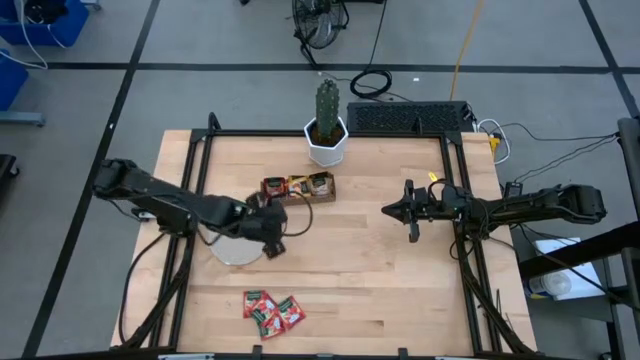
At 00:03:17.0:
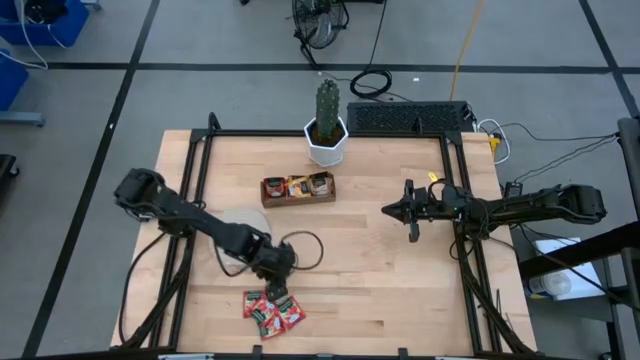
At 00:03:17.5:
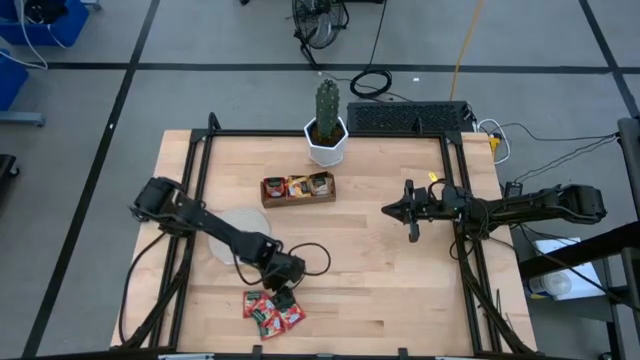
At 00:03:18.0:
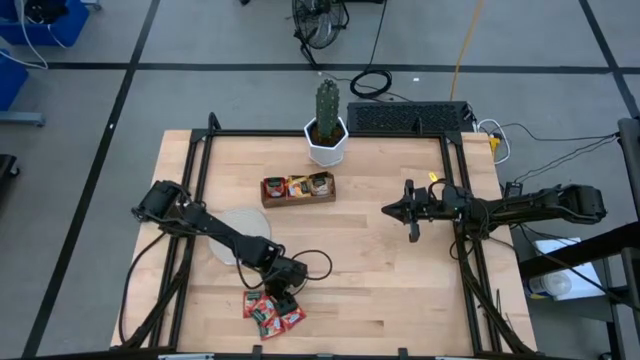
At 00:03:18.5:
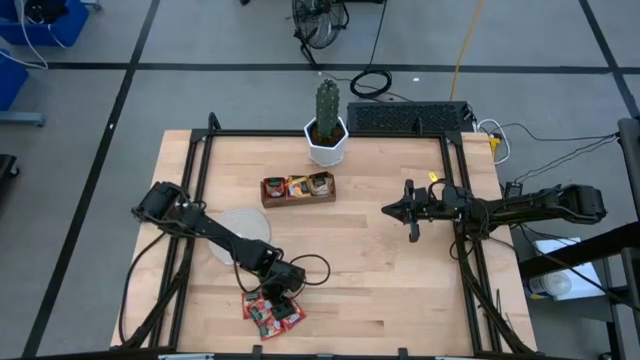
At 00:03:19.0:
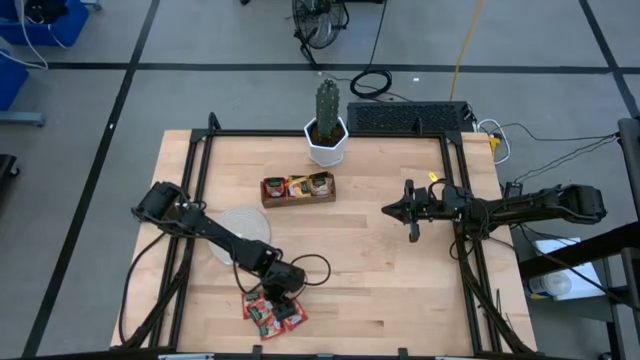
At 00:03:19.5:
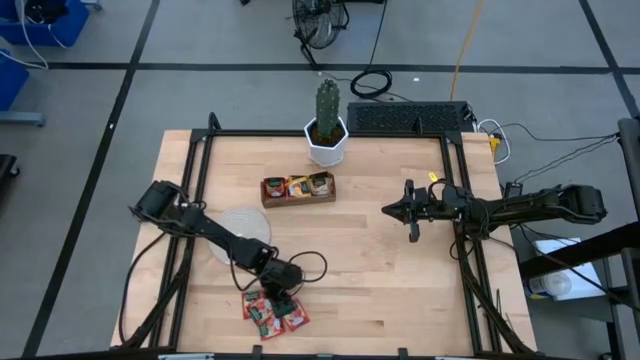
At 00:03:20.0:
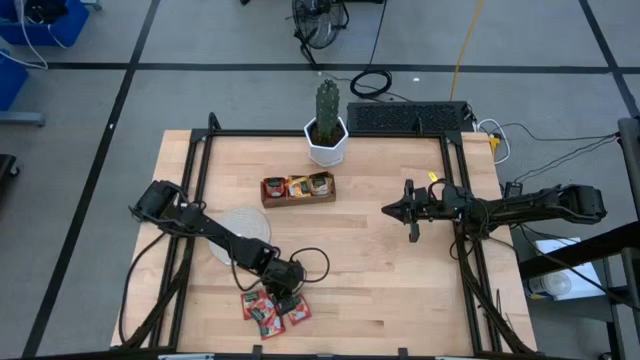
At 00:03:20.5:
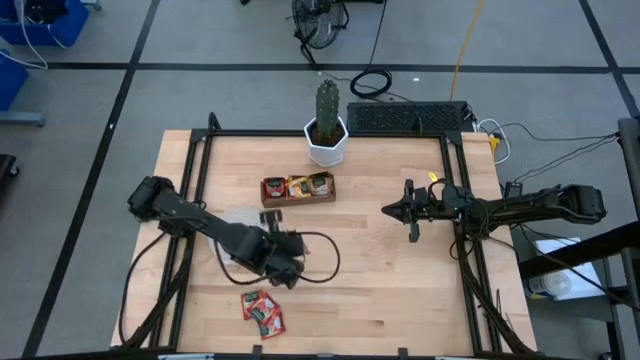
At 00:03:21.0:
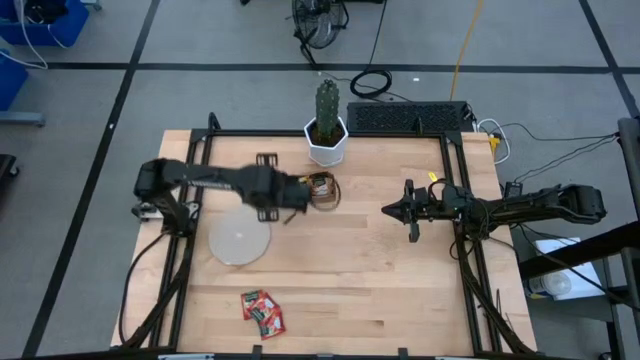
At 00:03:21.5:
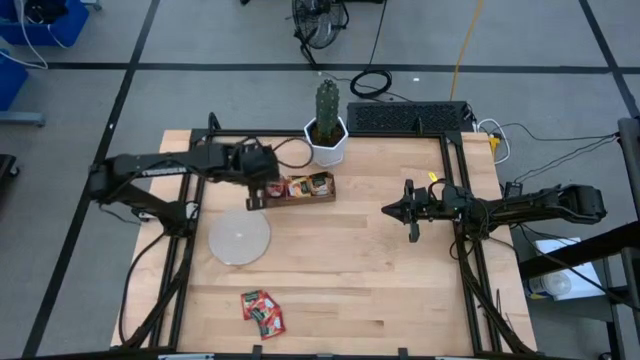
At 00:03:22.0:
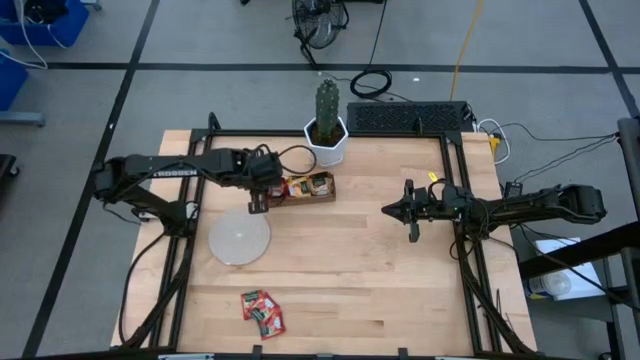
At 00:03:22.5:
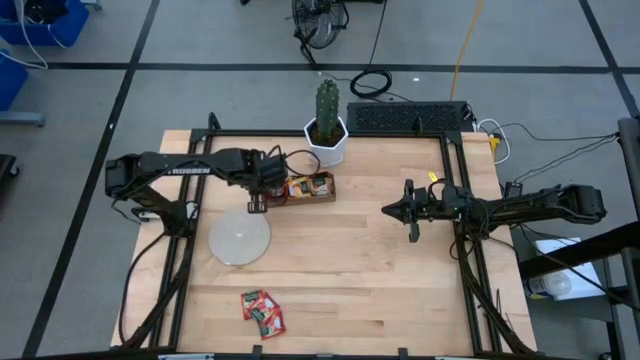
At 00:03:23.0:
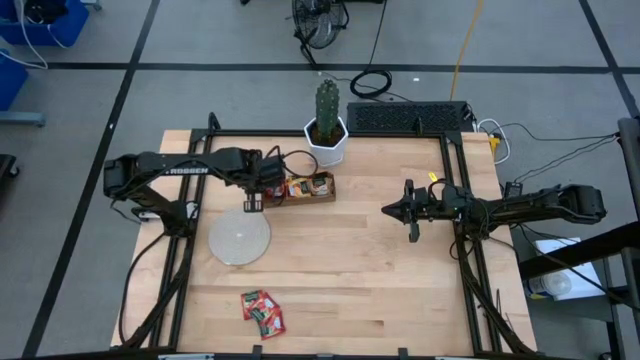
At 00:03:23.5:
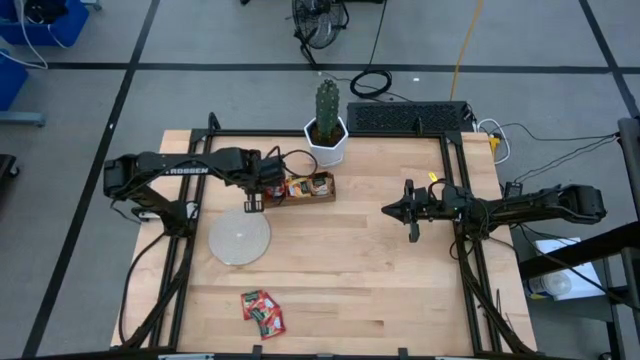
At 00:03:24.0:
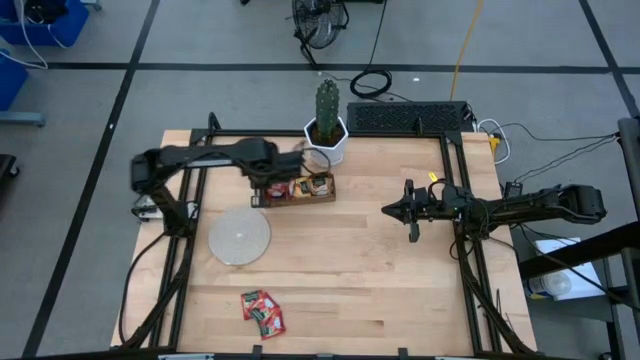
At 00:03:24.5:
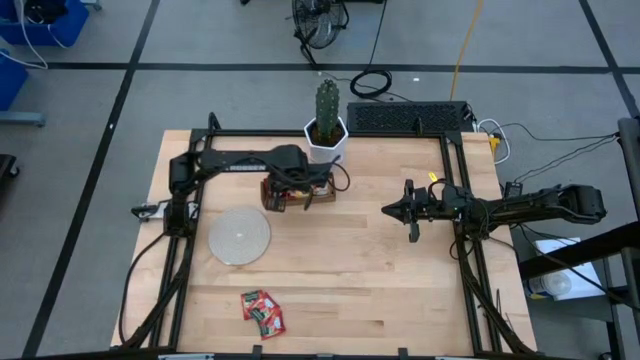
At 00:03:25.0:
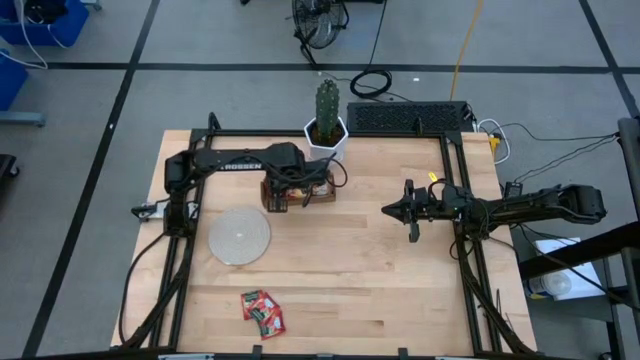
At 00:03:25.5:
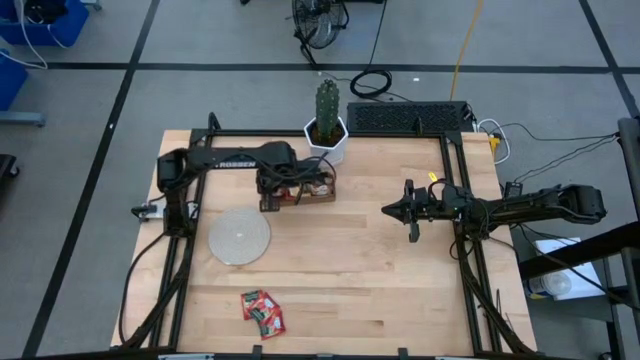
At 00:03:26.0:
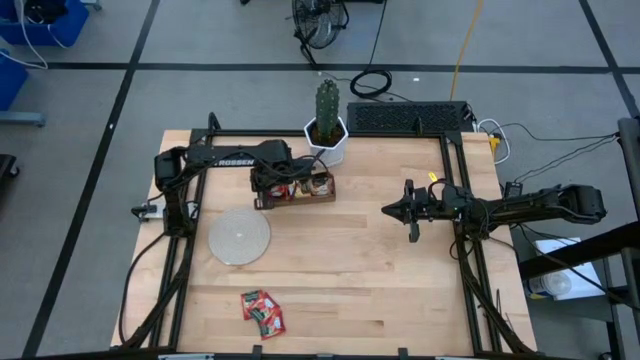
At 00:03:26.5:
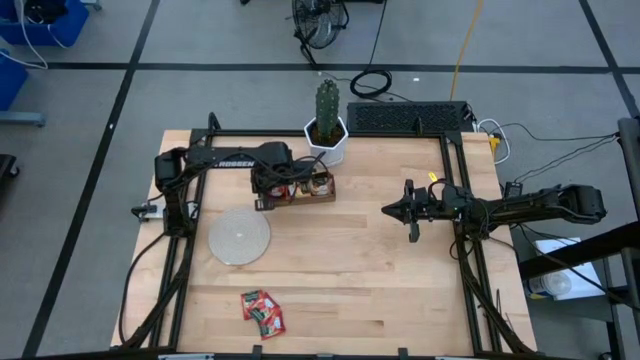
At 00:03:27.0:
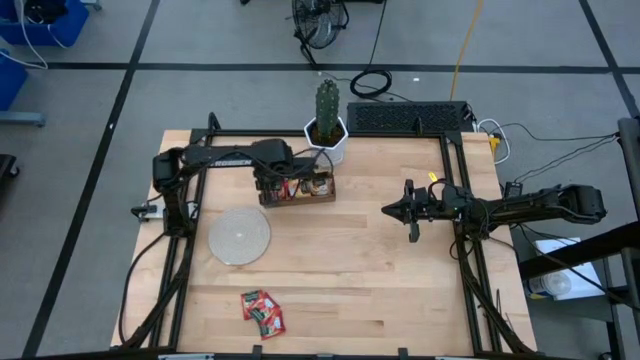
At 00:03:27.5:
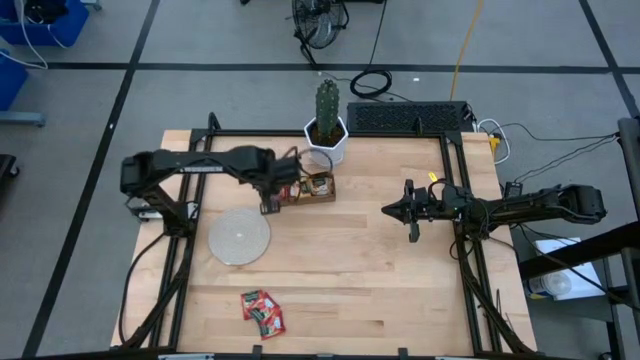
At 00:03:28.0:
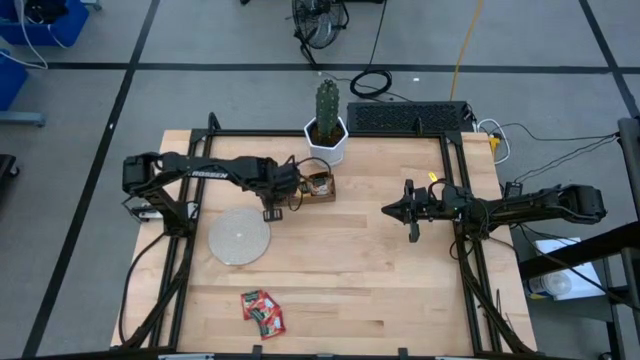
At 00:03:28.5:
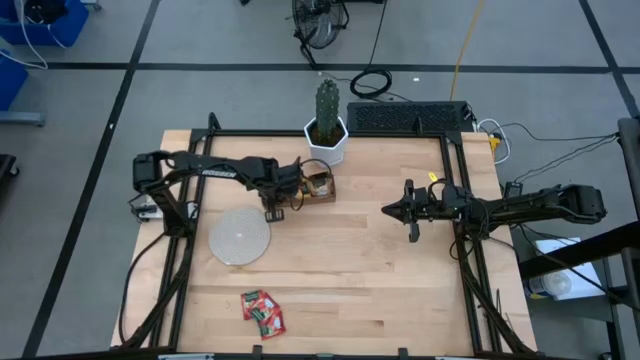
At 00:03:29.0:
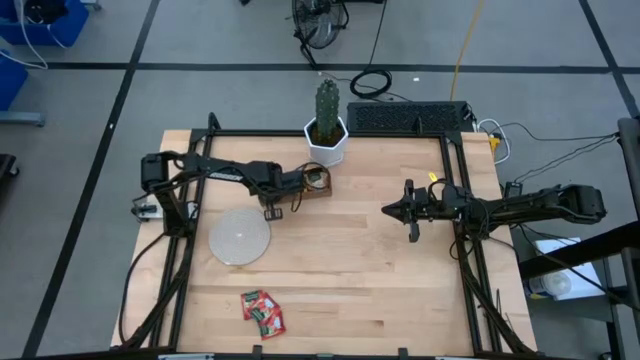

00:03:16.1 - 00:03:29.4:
Task: Pick & Place Tea
Put the red tea bag into the left section of the wooden organizer

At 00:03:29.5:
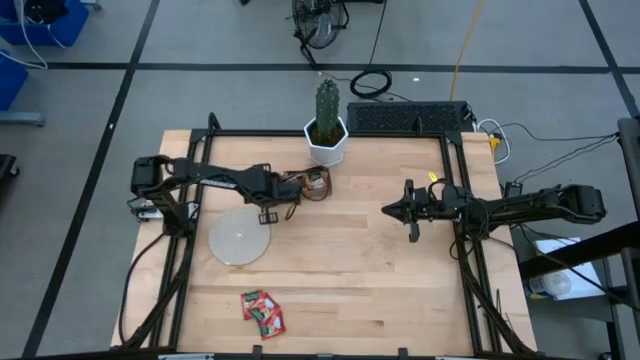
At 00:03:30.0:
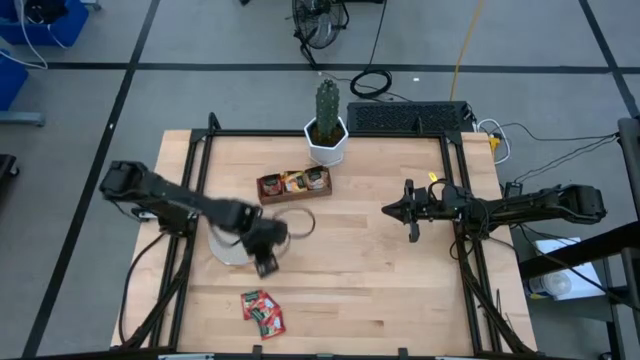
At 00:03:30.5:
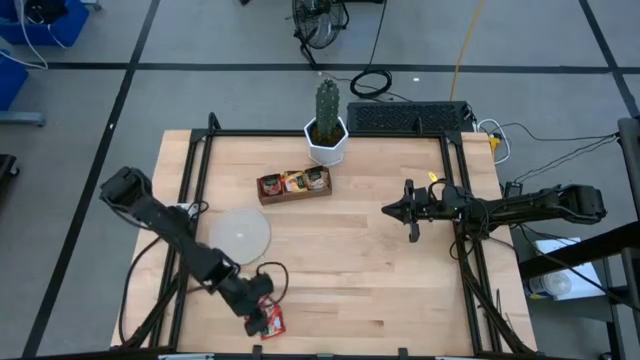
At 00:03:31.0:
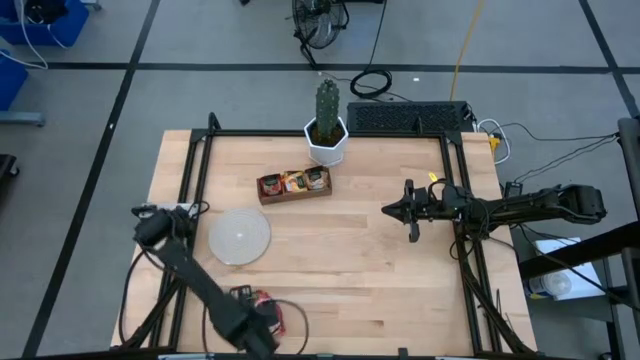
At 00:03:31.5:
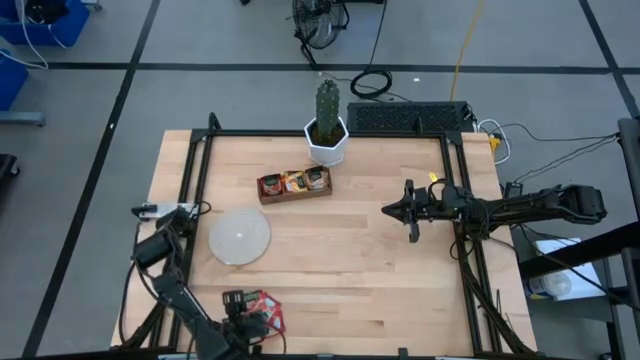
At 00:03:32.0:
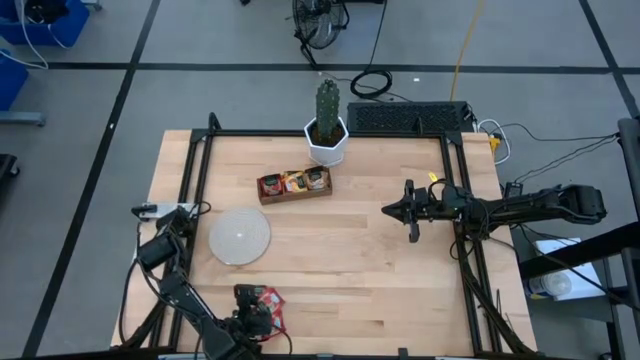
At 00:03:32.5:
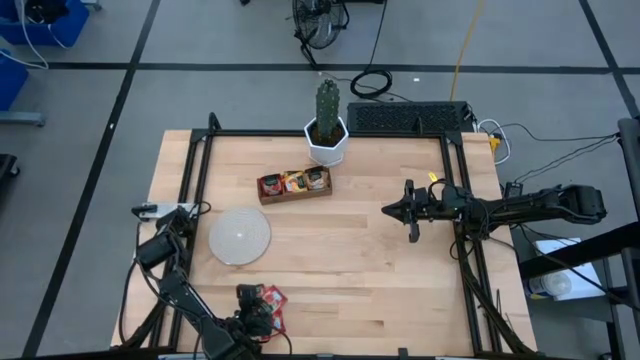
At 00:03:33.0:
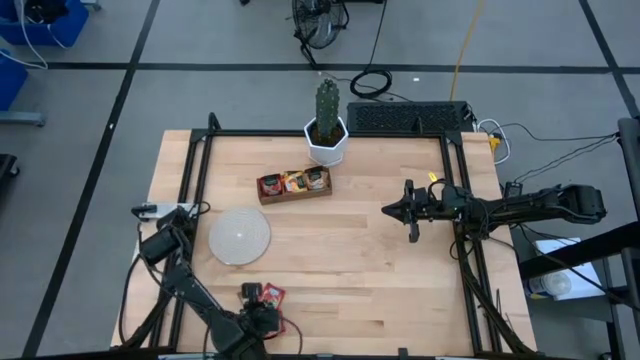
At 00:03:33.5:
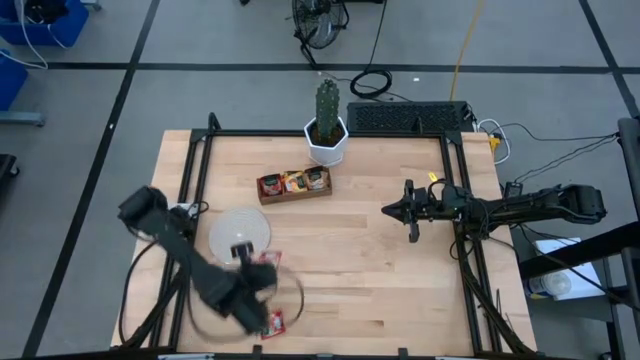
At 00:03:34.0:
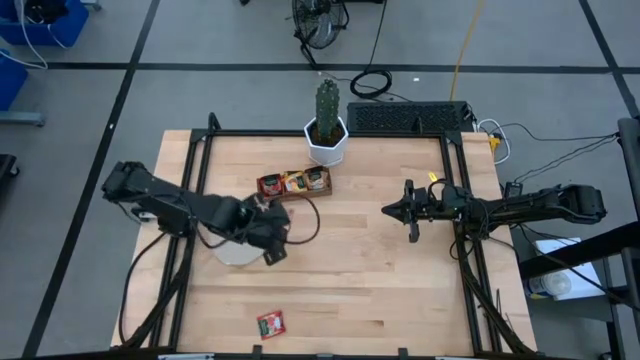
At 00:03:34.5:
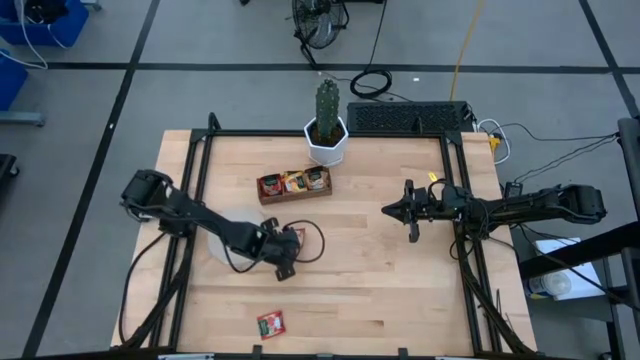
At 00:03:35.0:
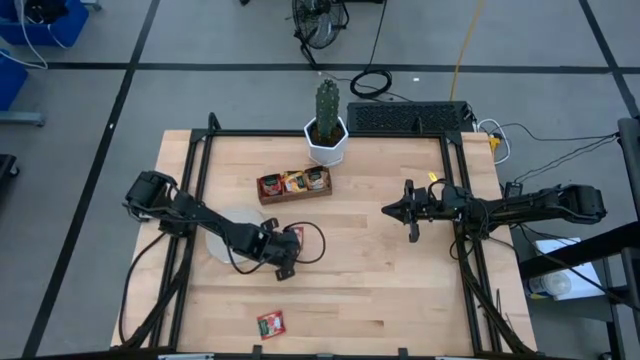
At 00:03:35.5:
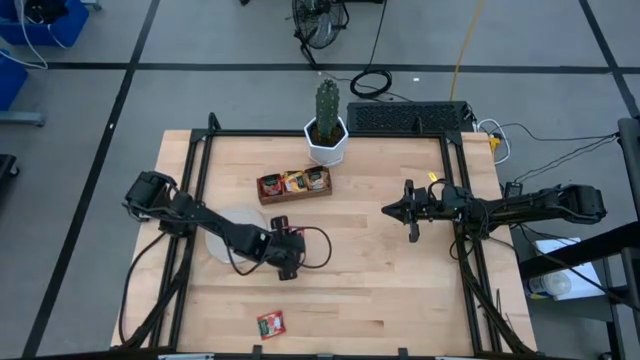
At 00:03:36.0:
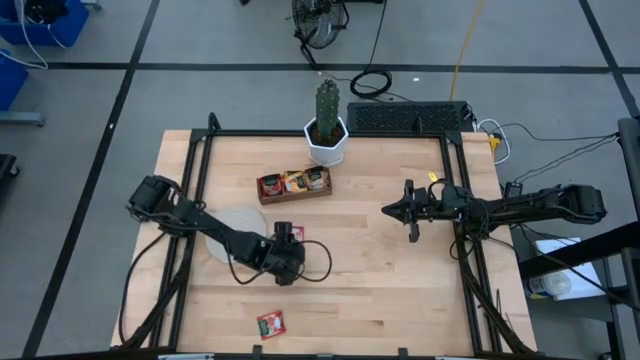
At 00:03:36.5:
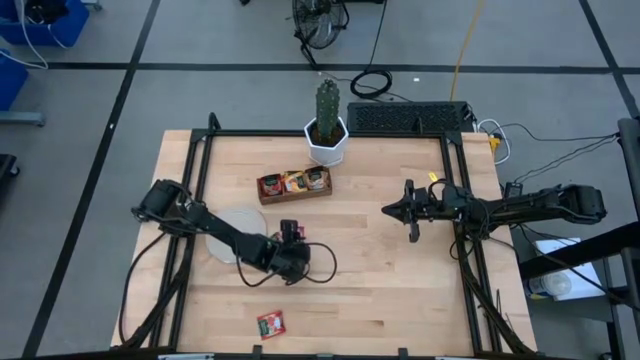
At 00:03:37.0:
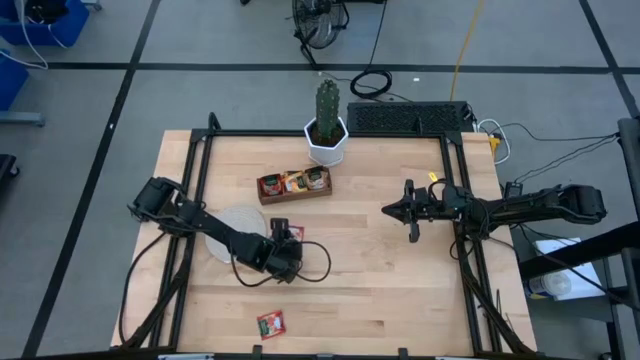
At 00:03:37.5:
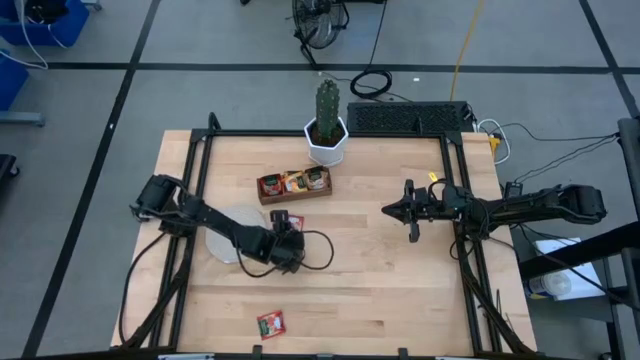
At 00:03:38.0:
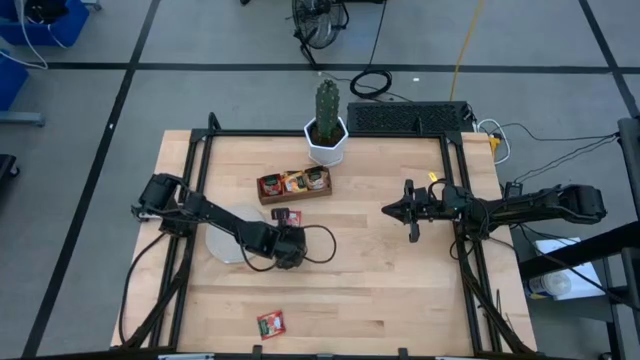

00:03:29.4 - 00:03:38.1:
Put the red tea bag into the left section of the wooden organizer
